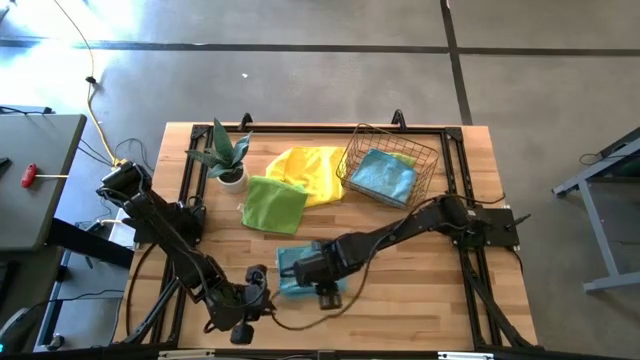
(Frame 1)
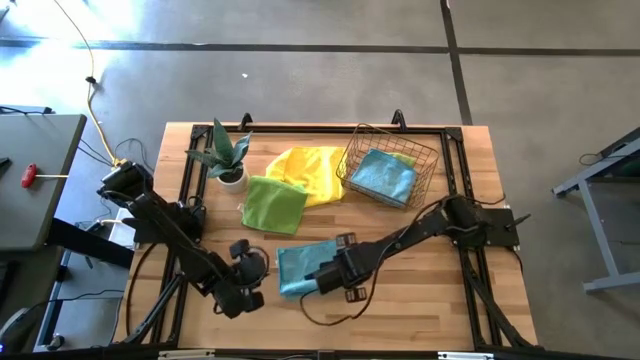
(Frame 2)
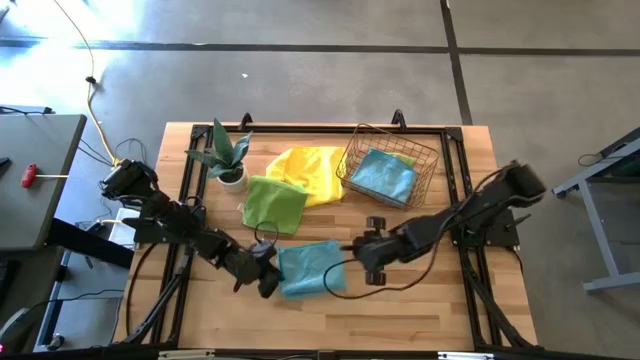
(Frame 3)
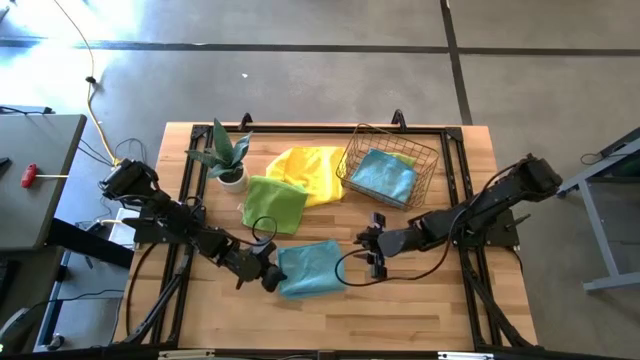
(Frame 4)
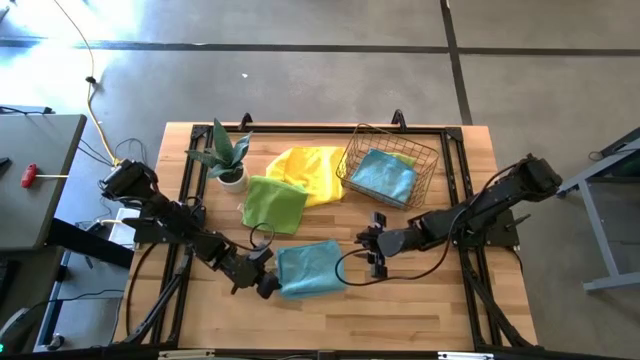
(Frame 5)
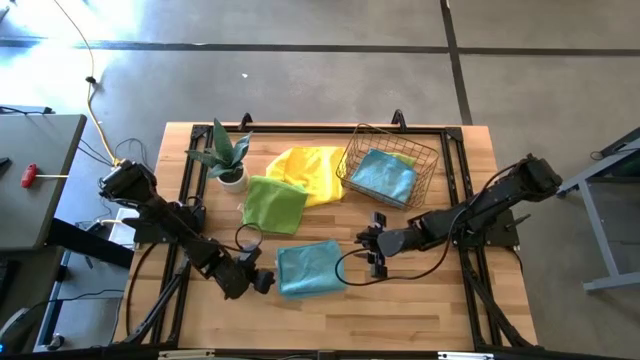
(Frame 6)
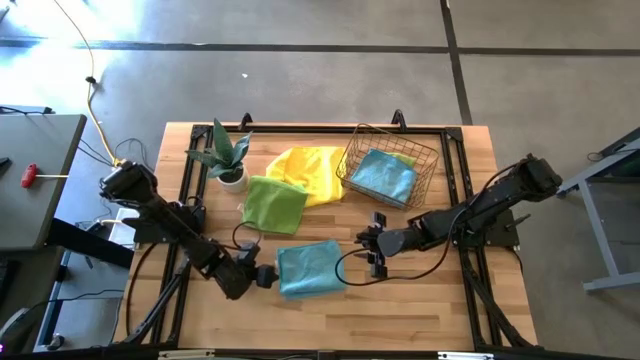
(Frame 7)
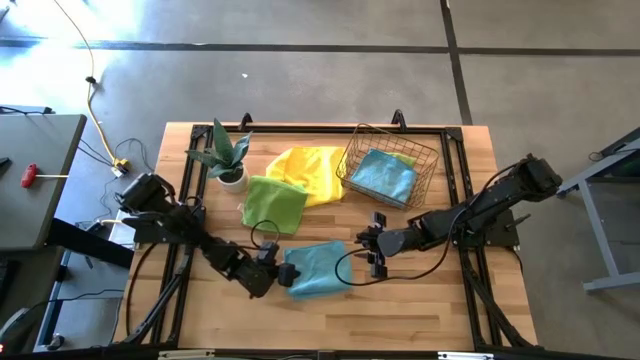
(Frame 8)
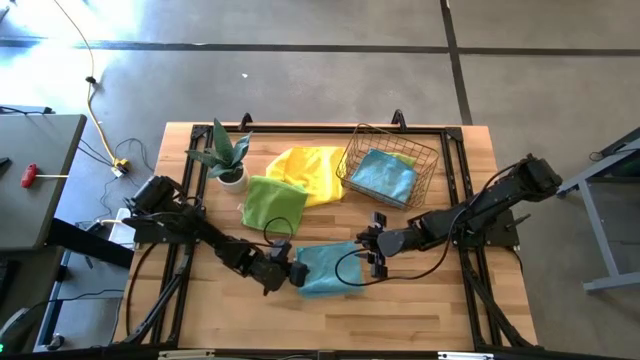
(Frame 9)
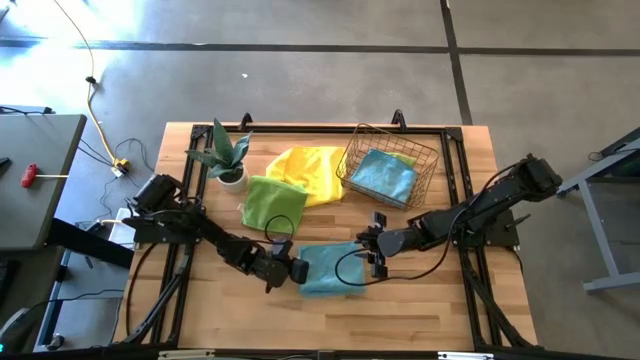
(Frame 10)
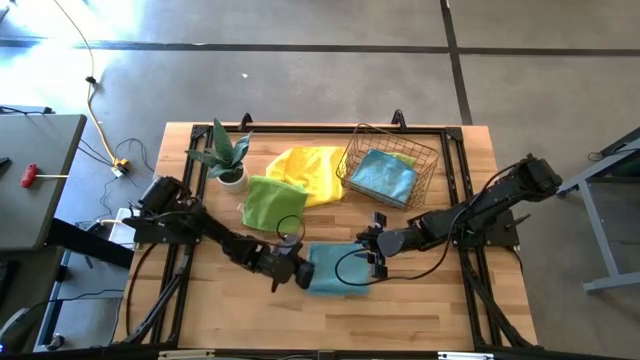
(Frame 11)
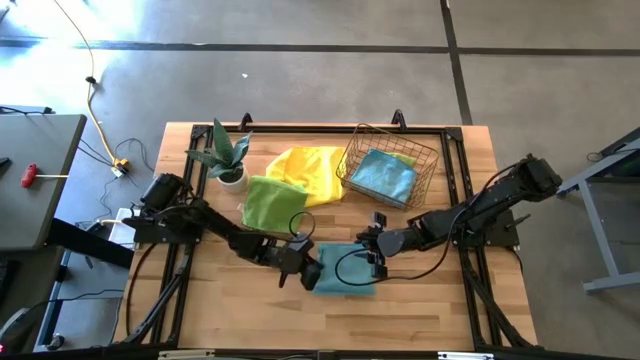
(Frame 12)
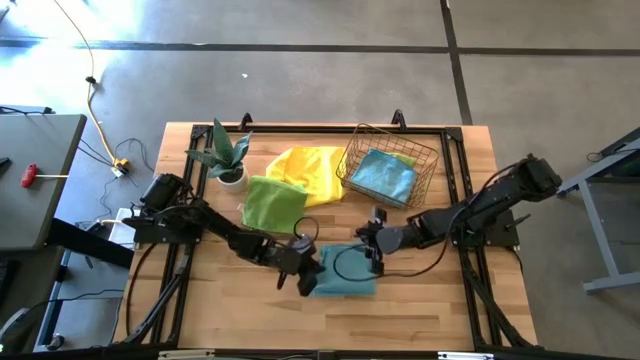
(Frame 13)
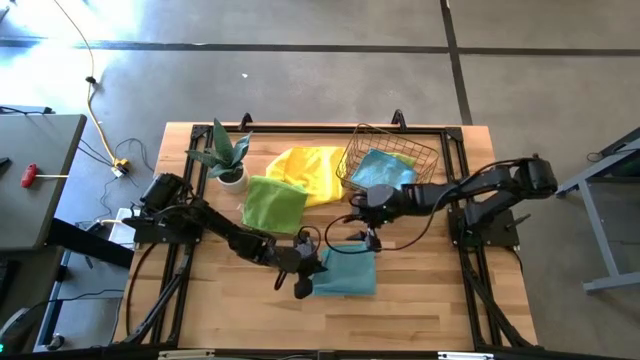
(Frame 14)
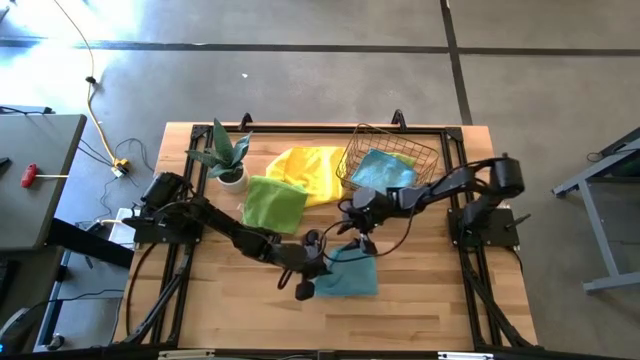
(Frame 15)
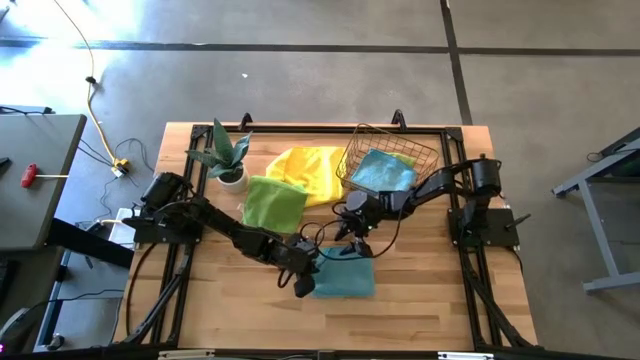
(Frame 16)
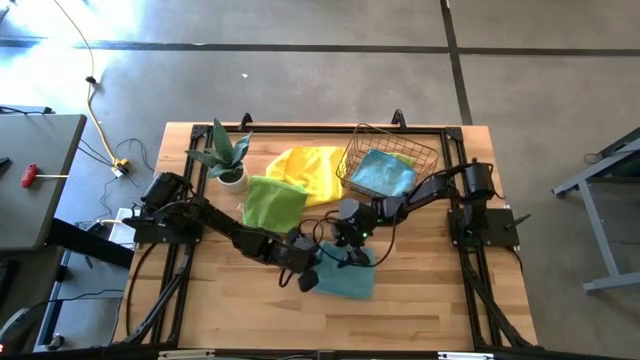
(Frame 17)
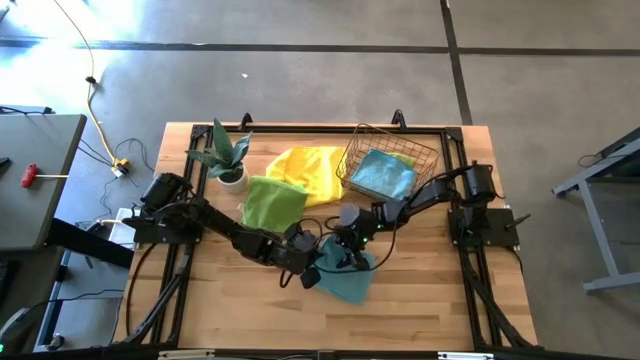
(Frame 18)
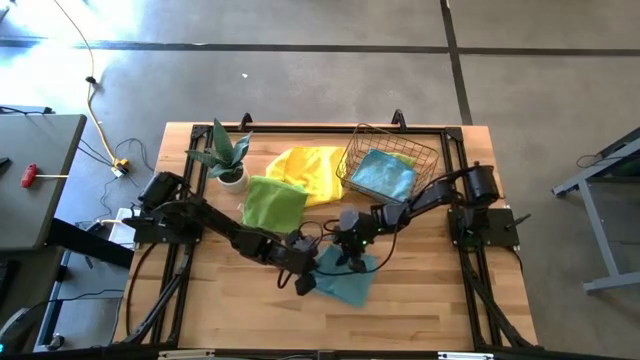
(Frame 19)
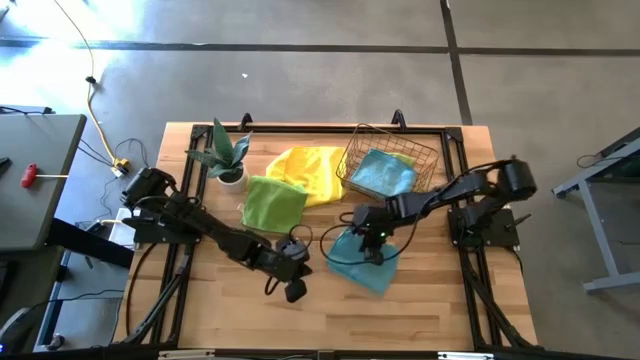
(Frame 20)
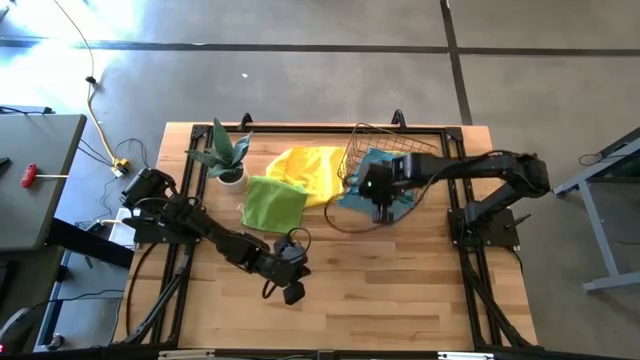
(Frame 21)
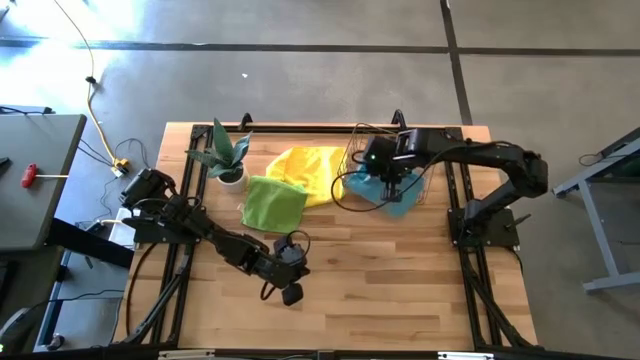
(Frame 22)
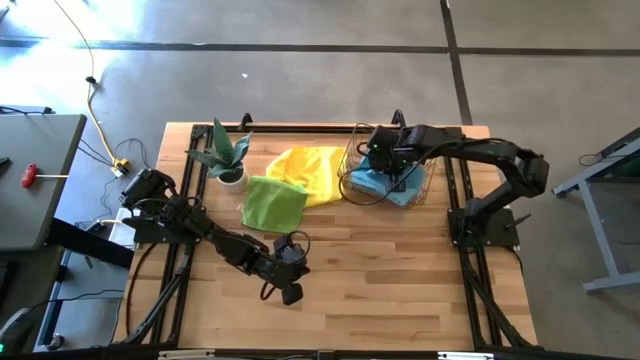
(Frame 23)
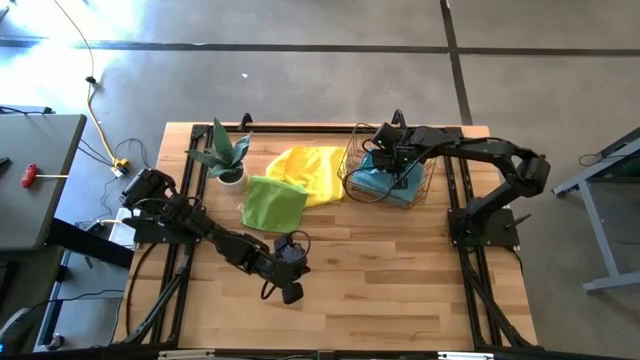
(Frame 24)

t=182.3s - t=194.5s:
Task: Fold microfiber towels
Put the blue microfiber towel into the wire basket

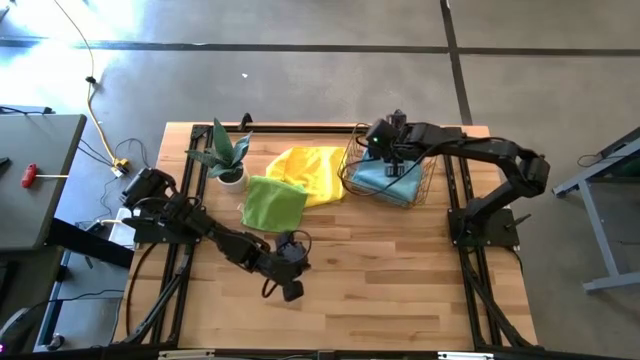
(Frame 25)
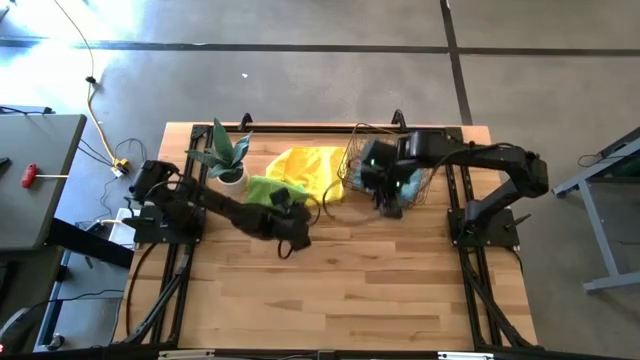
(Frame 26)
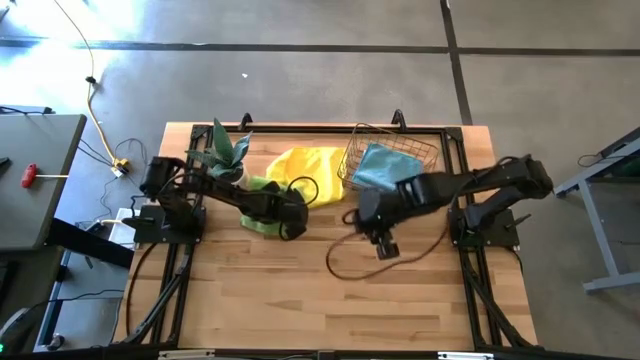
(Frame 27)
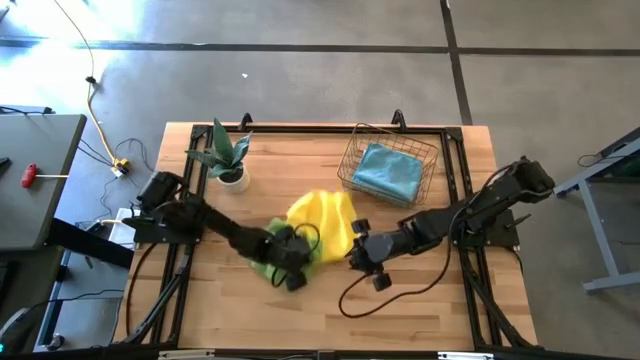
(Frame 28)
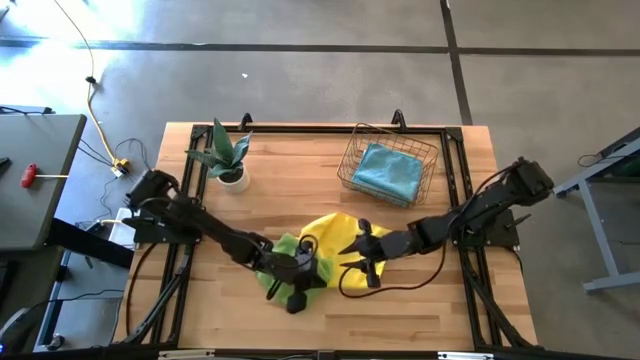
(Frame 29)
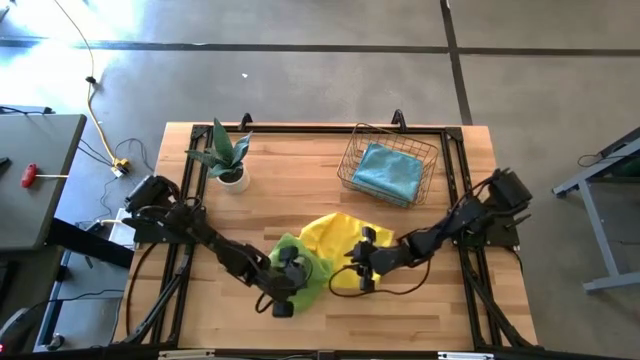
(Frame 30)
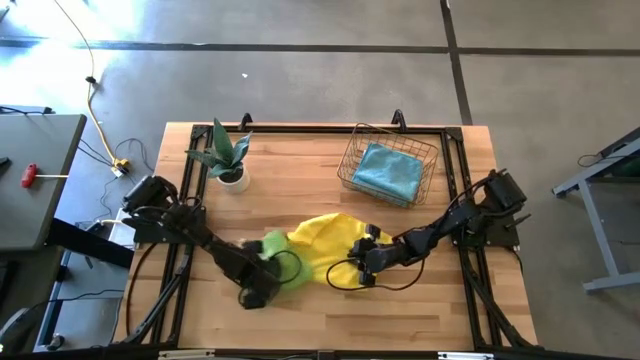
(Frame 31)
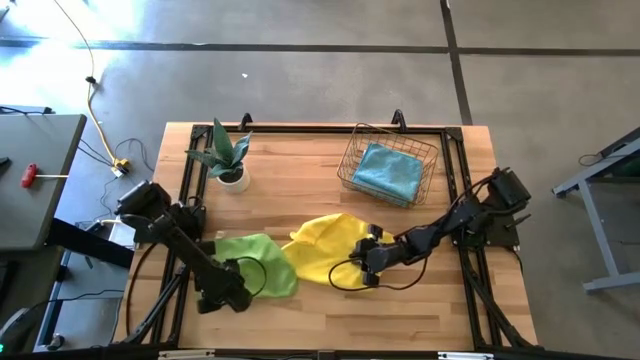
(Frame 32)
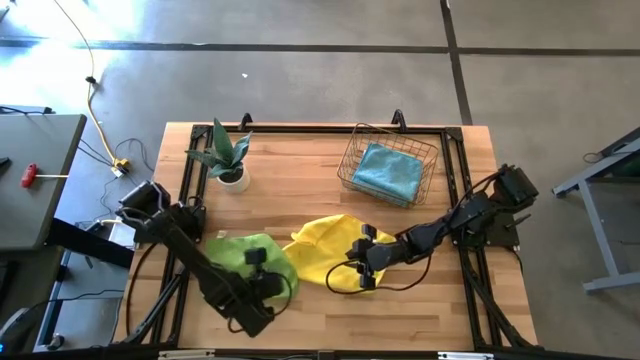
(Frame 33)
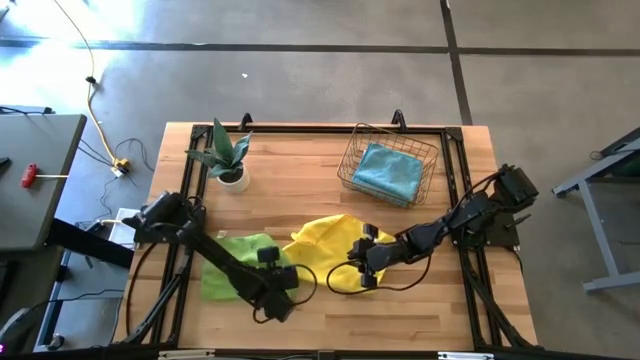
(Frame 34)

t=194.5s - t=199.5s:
Move the green and yellow microfiber towels to the center of the table

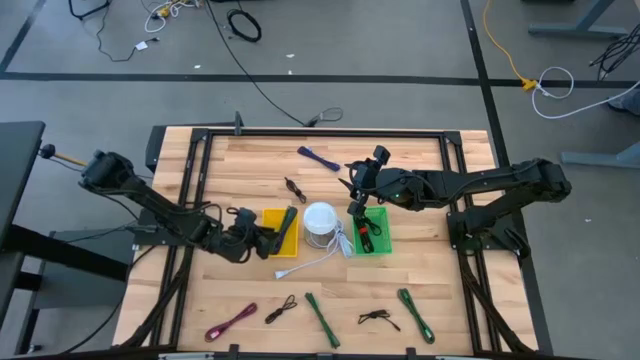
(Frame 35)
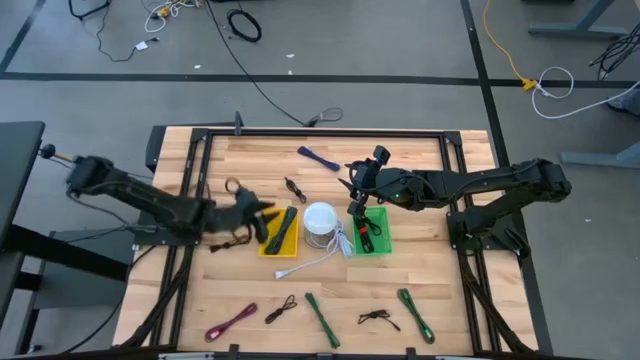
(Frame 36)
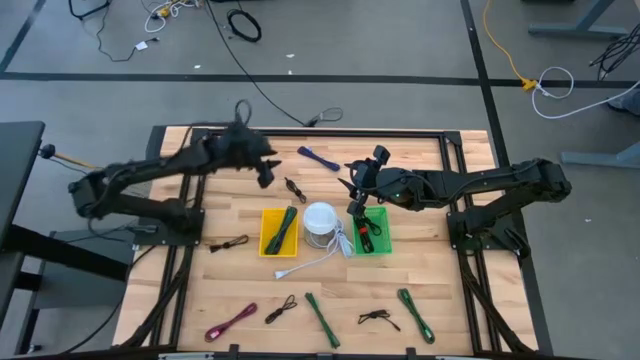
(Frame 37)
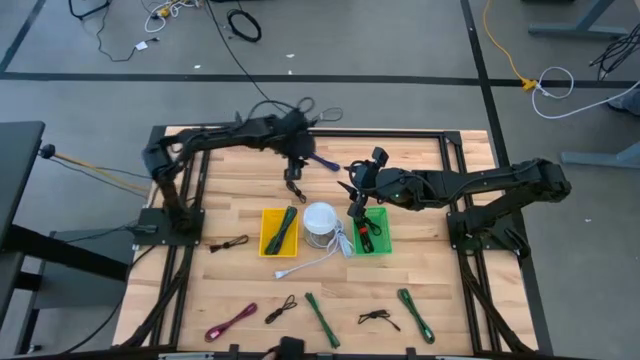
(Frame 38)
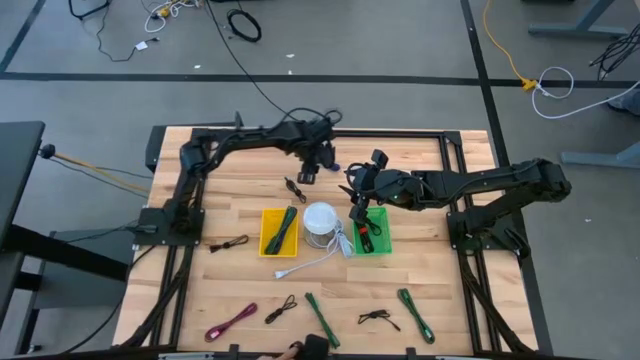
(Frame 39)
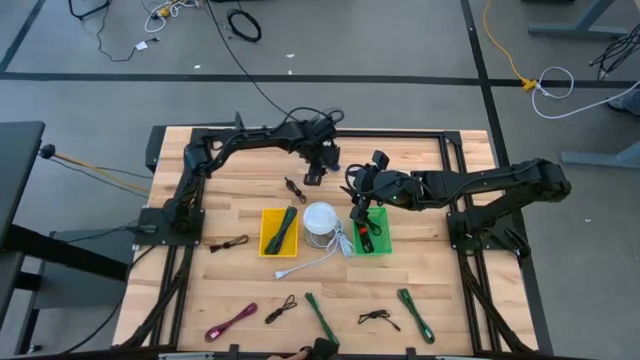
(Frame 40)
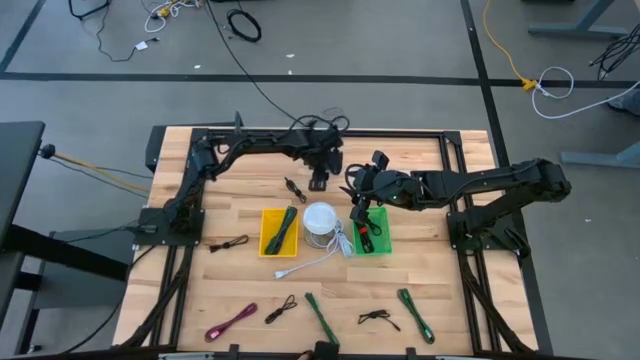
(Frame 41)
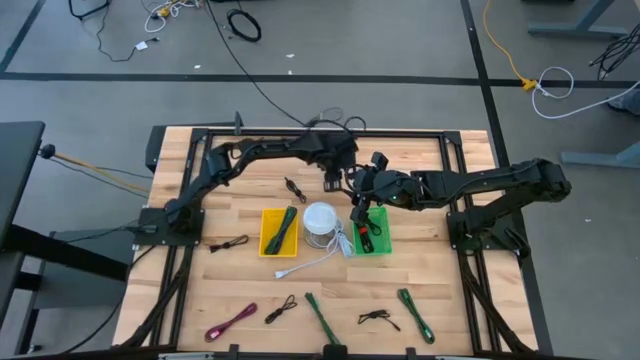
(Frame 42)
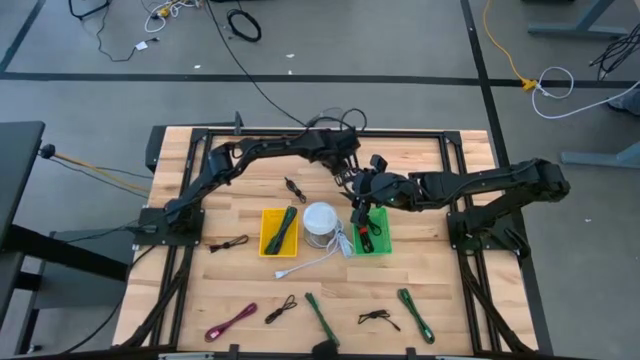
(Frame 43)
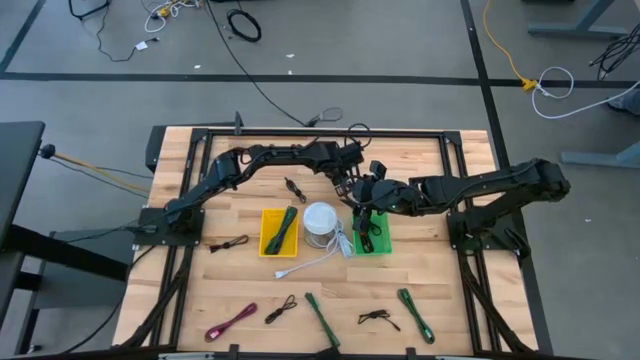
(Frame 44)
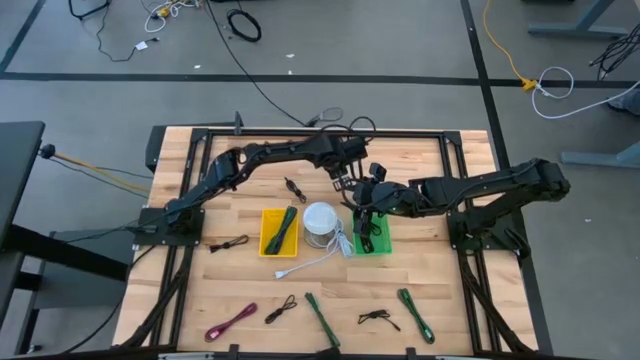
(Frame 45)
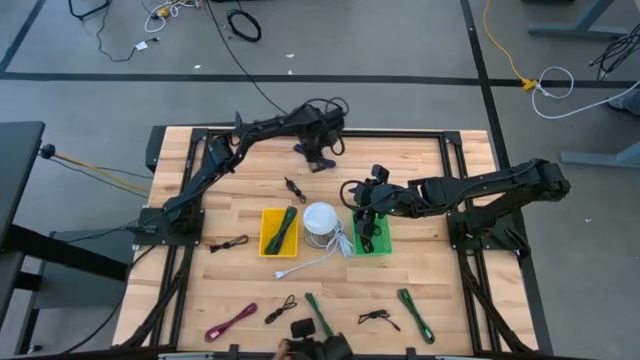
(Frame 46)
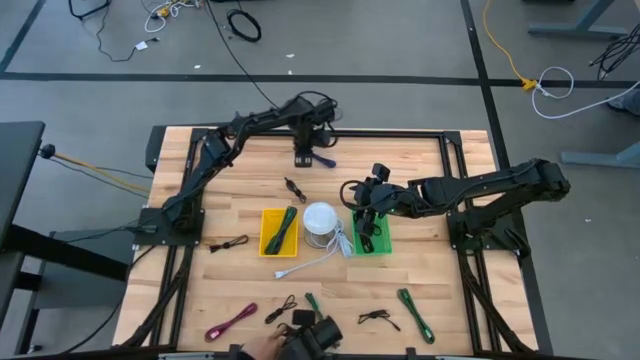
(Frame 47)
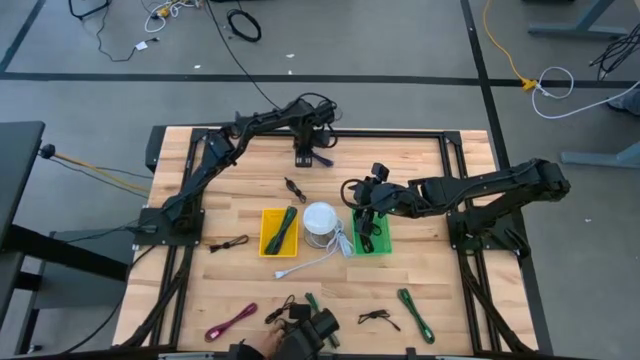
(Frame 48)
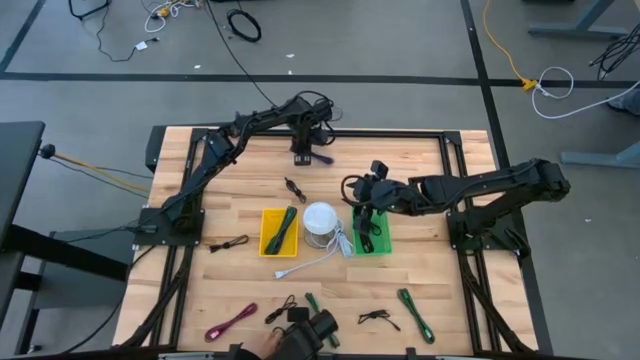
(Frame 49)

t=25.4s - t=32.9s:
Task: Pick & Place USB Port
Put the black blue charger cable into the yellow basket
